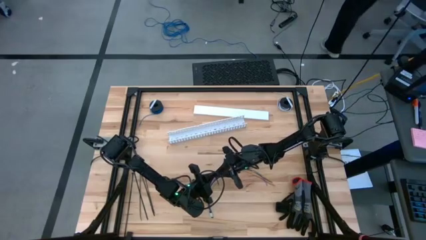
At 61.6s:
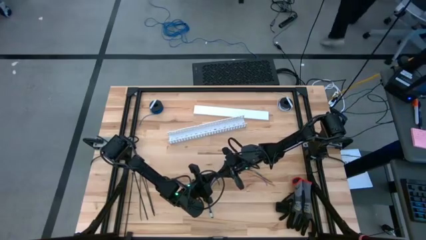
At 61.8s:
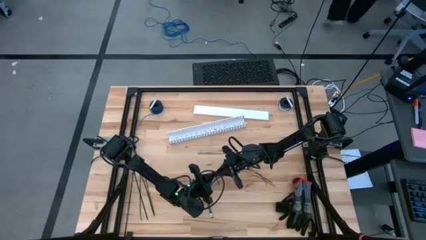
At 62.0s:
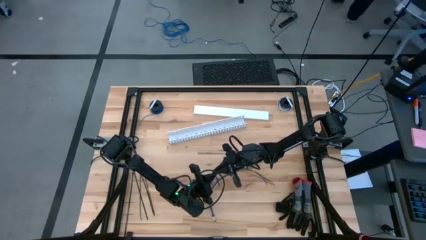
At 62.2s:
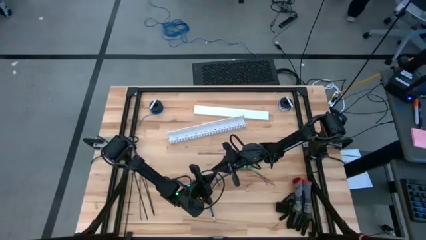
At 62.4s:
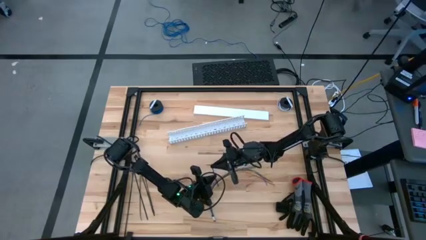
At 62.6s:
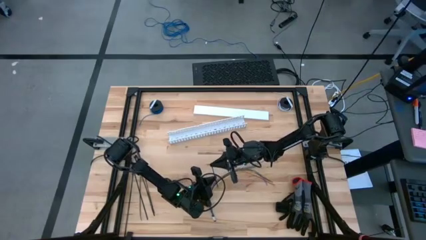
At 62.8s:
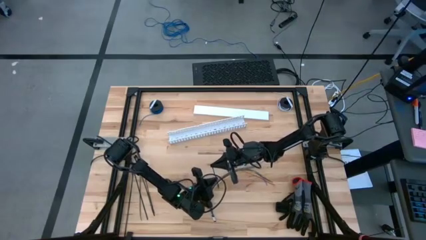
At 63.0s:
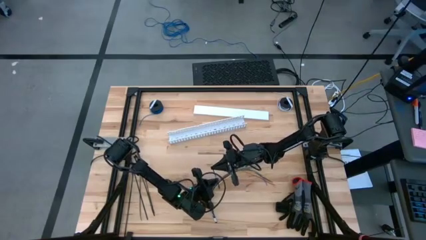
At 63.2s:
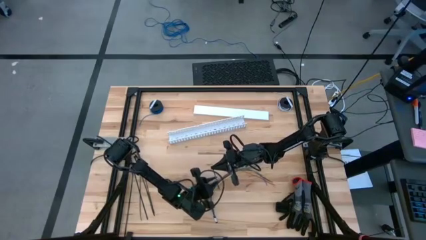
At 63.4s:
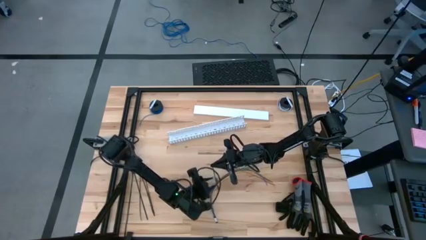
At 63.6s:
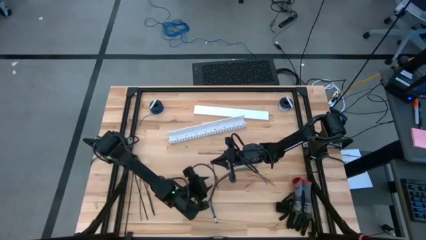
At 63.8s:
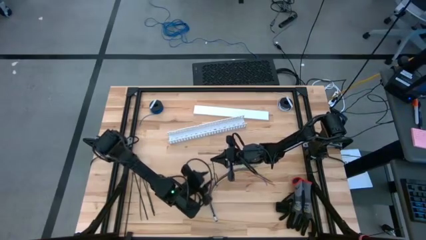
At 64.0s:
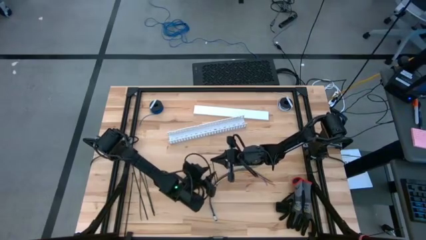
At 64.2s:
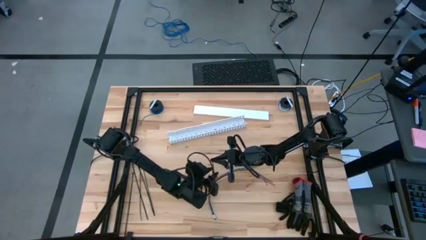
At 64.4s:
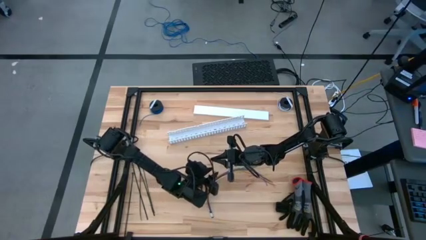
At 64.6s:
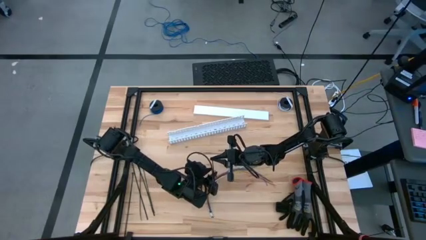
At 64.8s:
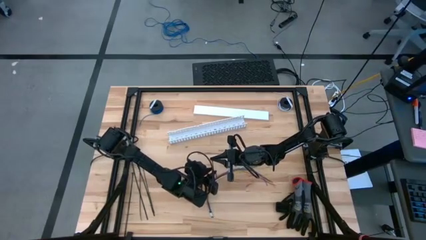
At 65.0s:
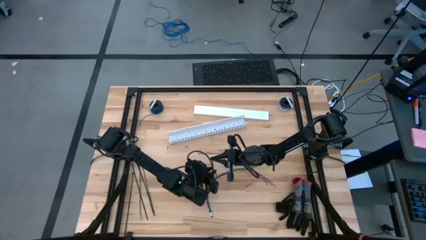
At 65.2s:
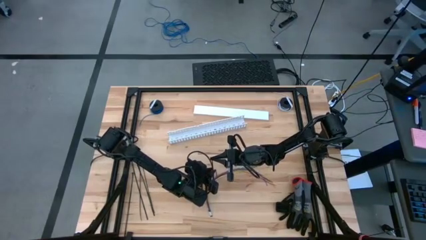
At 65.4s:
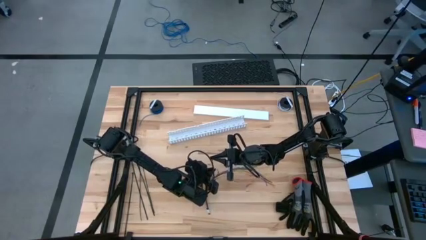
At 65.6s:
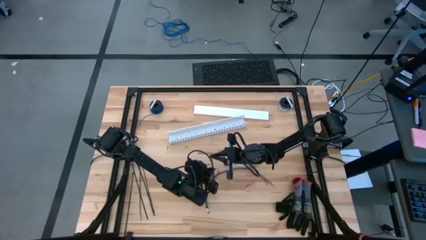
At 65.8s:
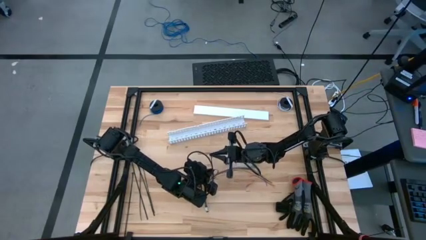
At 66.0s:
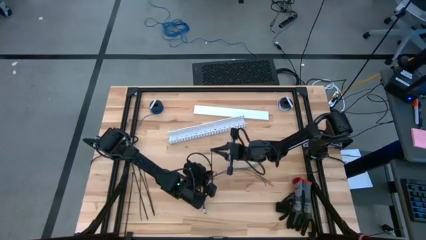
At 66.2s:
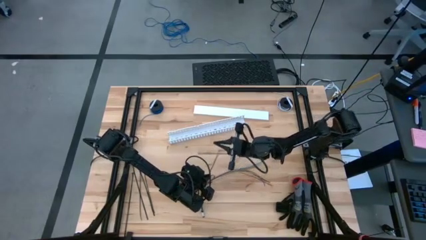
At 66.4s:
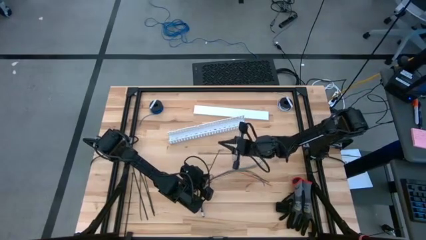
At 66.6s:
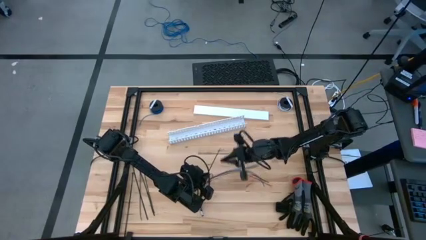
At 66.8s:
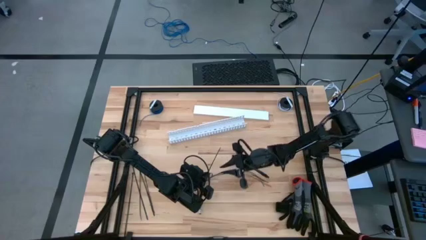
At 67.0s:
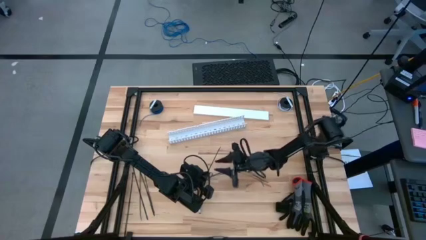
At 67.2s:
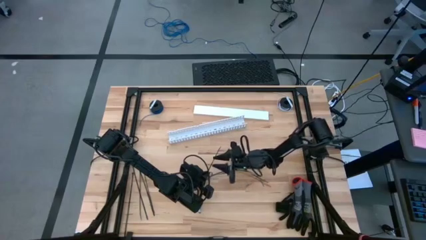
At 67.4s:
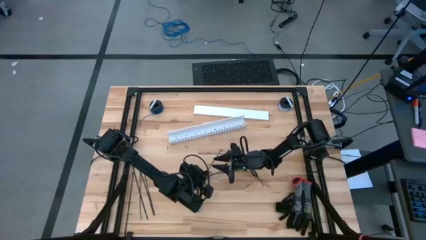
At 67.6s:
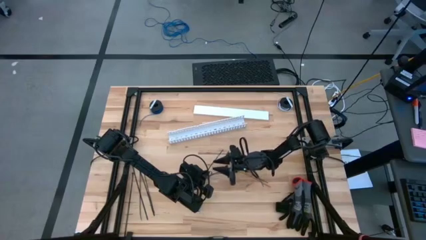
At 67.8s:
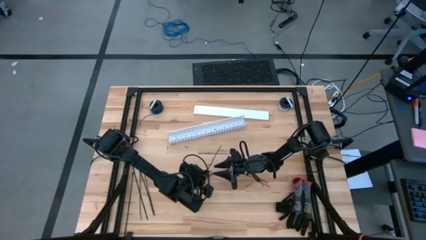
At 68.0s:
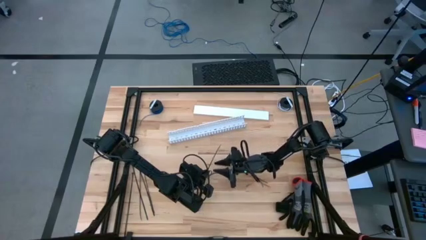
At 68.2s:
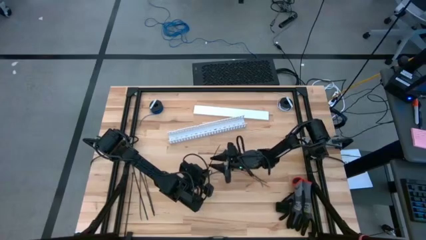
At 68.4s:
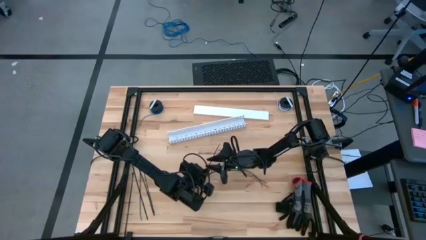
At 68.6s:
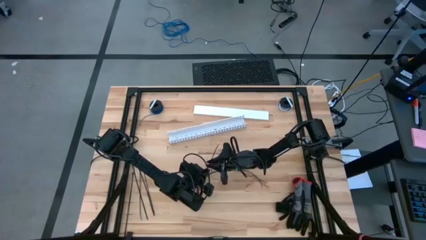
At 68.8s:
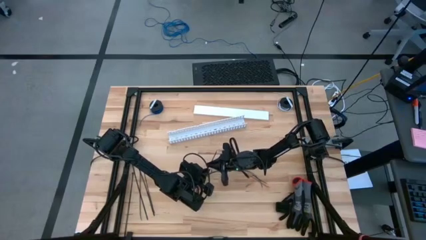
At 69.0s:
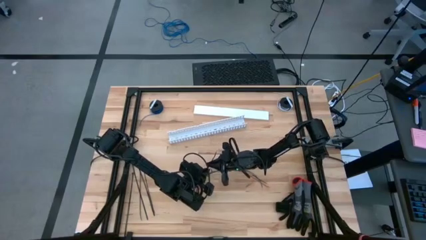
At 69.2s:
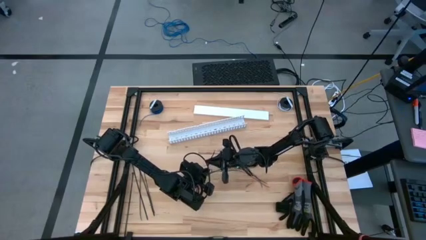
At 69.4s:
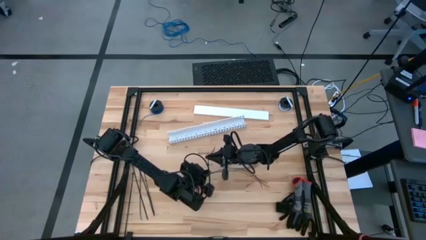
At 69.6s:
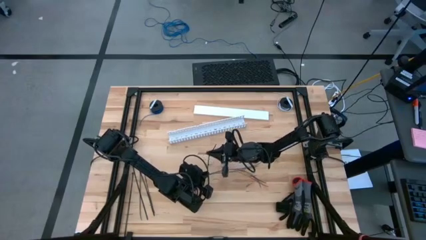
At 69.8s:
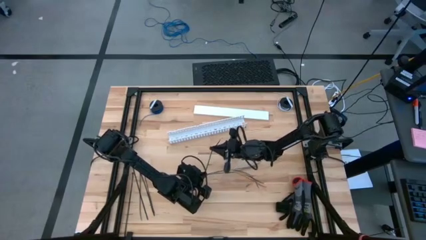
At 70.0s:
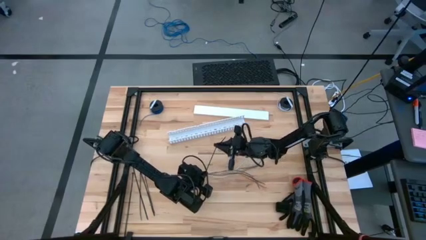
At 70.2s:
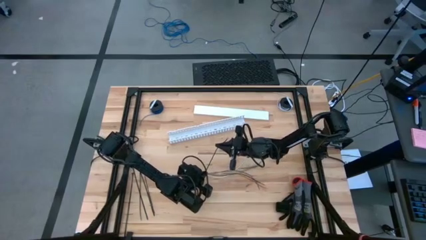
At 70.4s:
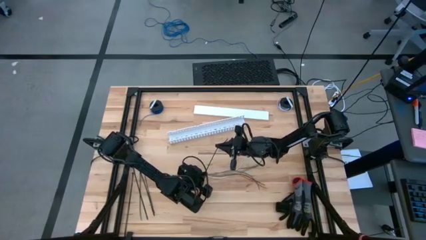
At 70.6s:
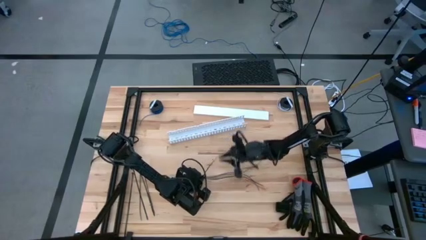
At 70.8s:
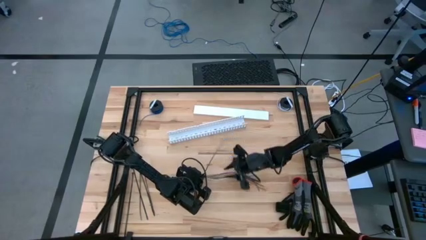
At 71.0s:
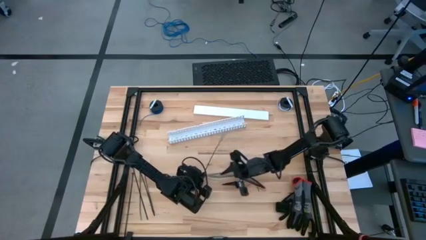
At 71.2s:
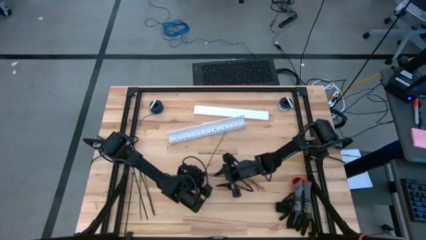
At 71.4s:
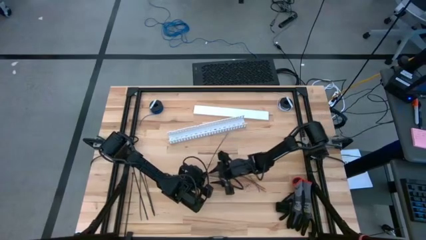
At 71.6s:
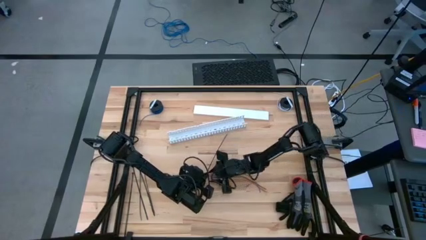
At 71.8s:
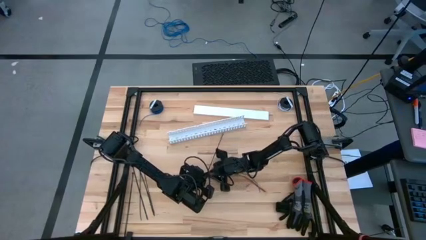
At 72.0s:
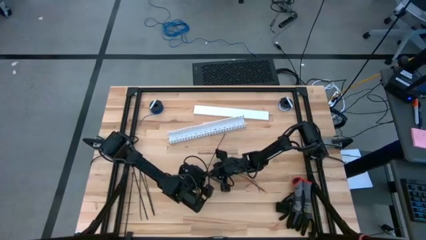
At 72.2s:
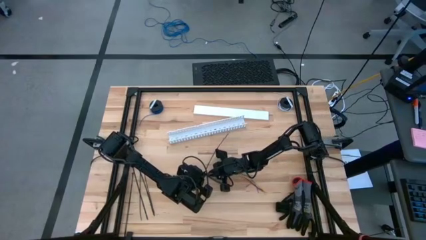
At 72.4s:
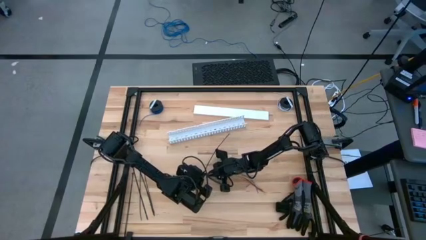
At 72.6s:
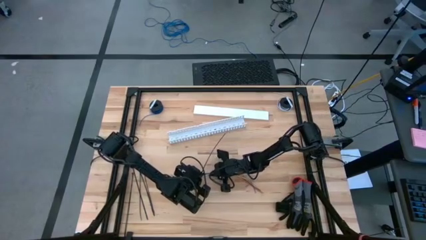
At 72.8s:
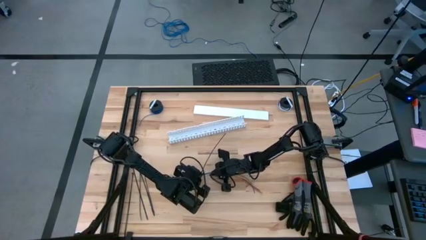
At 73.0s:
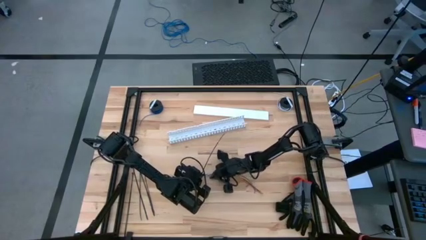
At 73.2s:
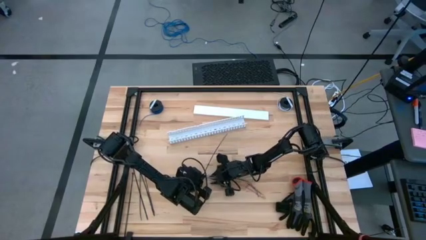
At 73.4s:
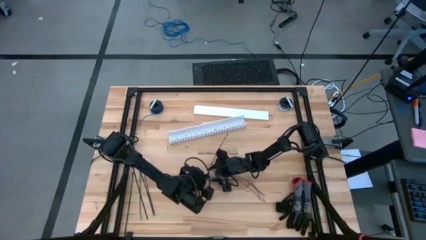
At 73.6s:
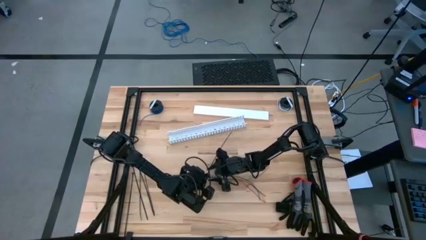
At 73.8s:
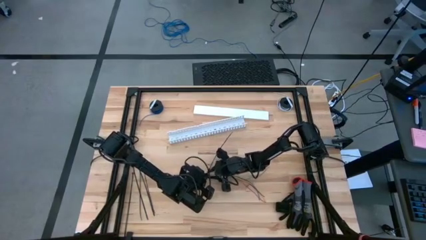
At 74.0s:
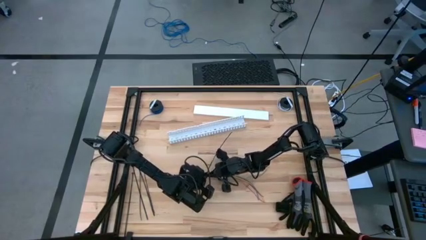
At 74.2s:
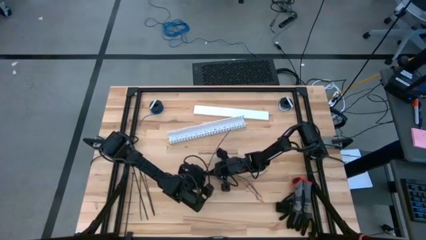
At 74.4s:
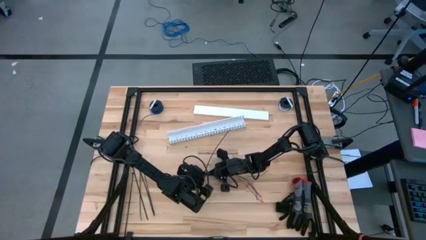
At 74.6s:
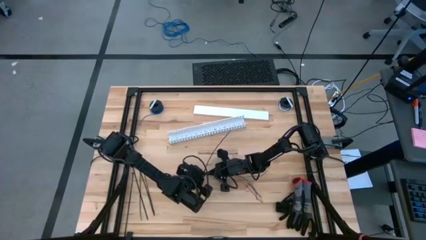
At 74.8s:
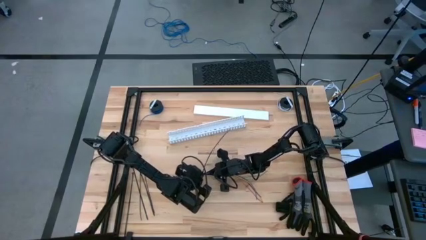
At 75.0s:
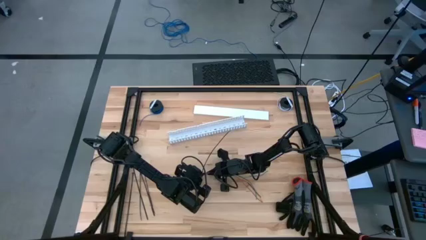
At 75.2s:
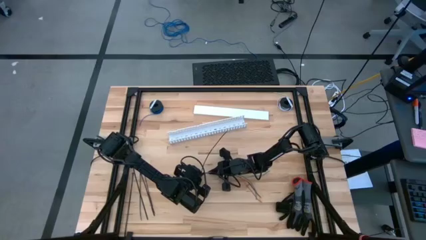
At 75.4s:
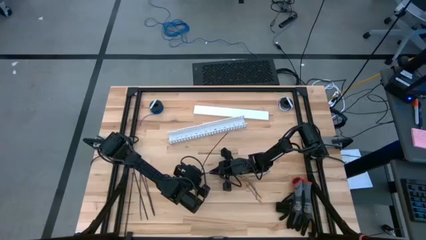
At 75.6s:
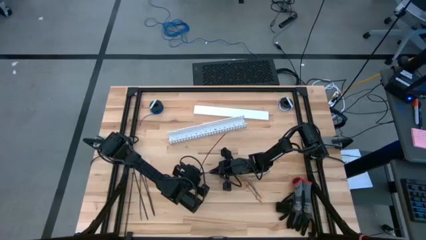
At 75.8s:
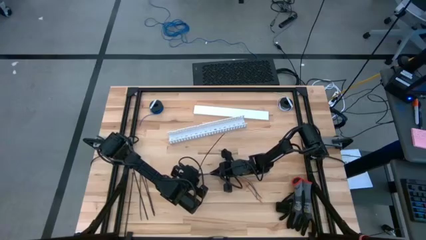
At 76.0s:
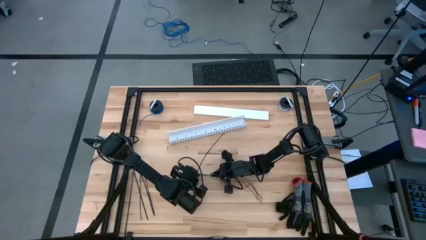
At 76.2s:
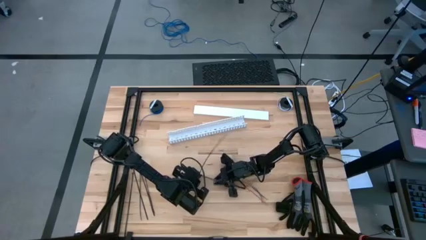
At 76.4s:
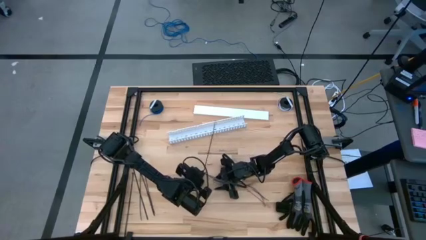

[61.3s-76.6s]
Task: Ziptie cables
Wrap the colored loose cables with the black zip tie

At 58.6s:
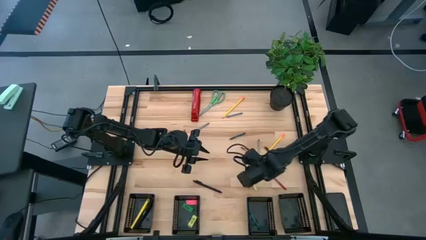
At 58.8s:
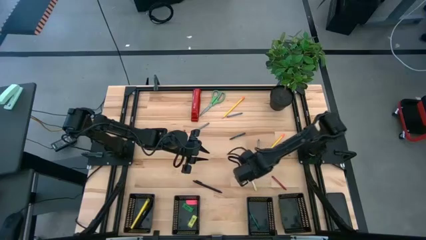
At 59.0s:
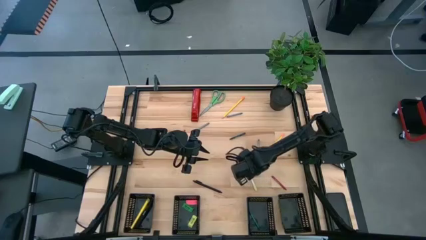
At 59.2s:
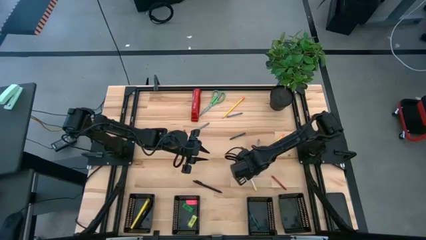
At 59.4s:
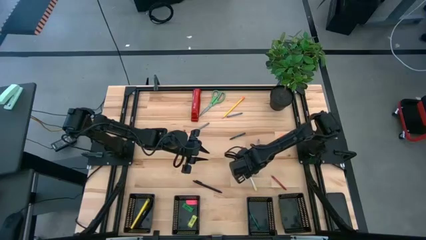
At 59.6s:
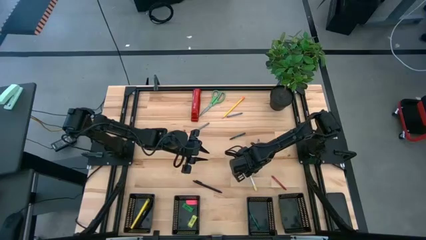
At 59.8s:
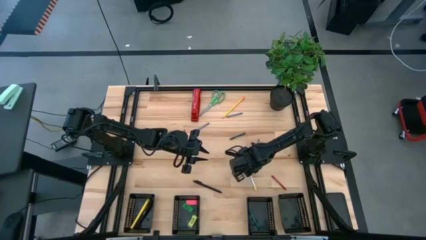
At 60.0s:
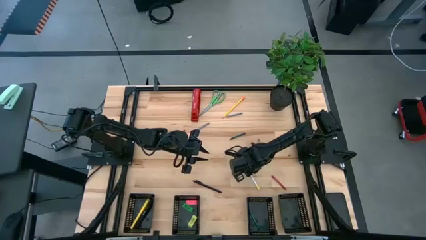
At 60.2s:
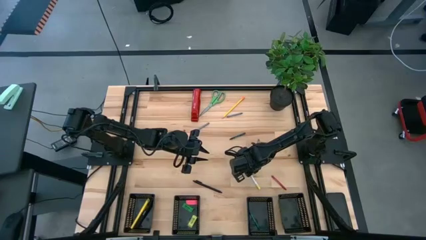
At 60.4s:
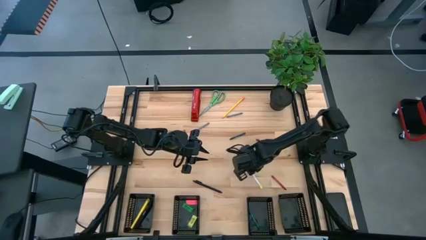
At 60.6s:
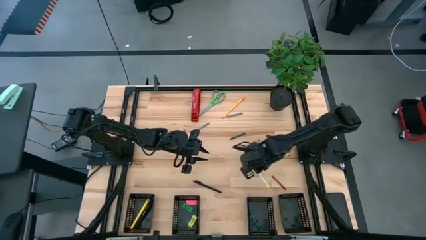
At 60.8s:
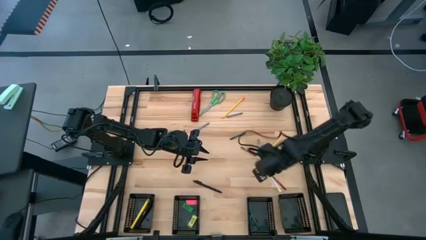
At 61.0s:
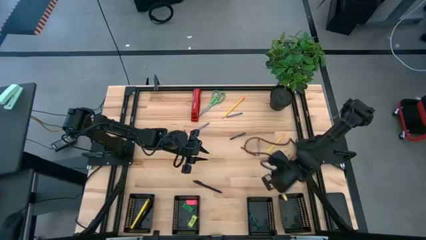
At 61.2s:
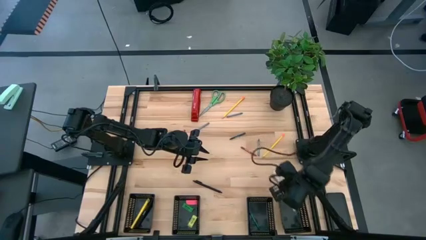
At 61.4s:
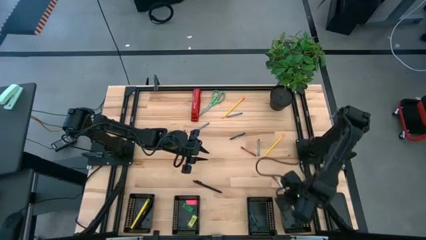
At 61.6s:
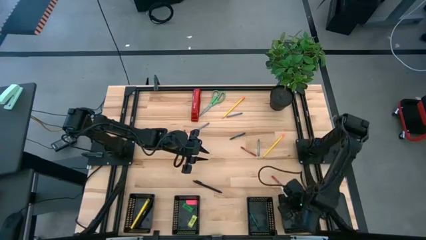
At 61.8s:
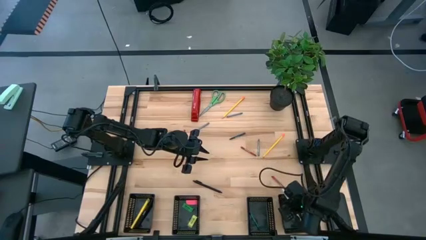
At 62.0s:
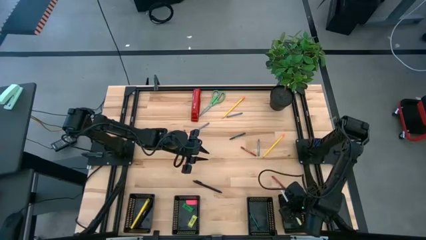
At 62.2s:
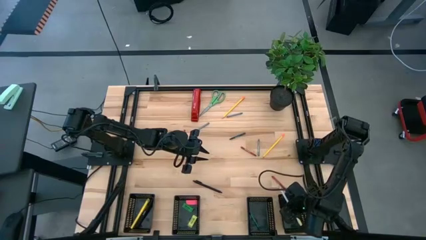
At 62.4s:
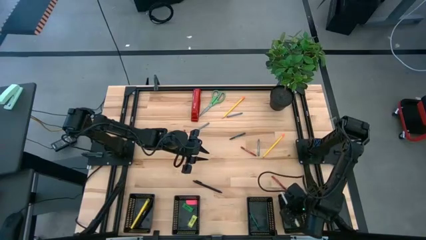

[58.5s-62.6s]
Task: Sort crayons/erasers/pens/pencils in bins
Put the white pencil into the right black bin
